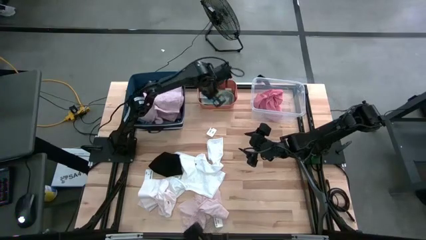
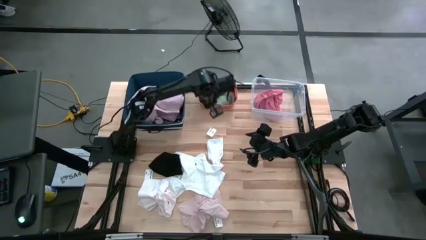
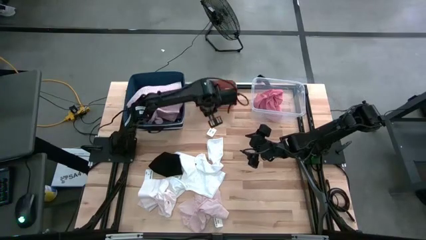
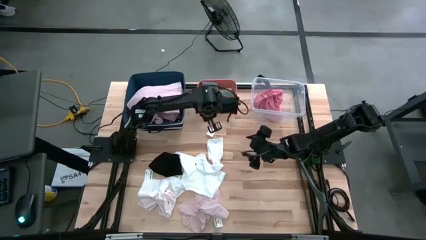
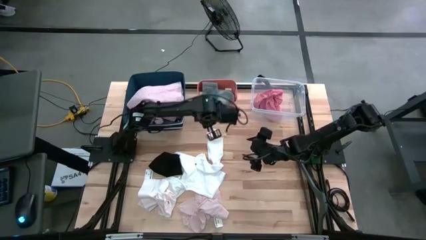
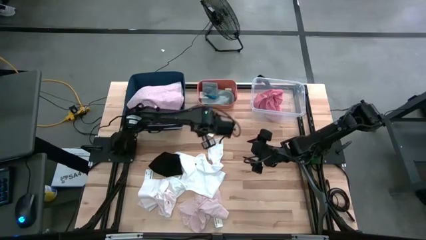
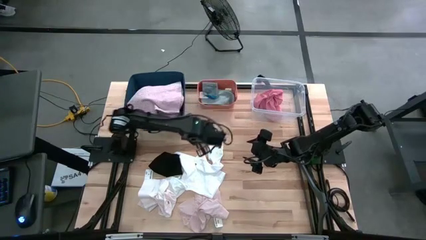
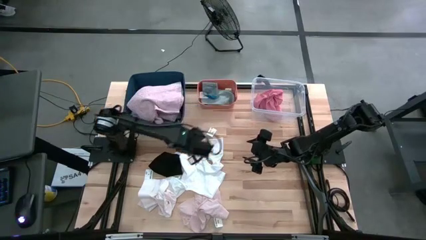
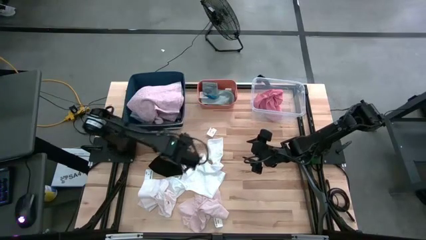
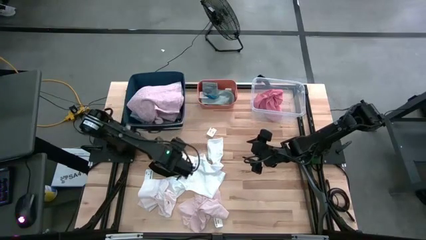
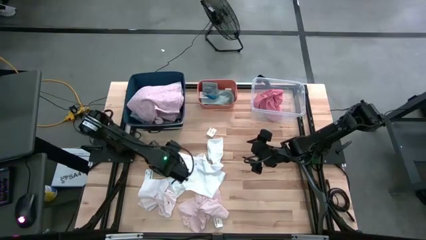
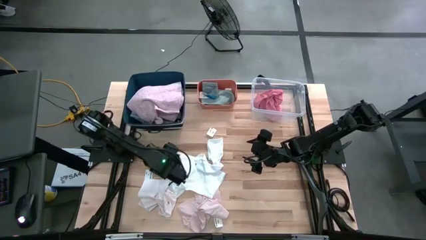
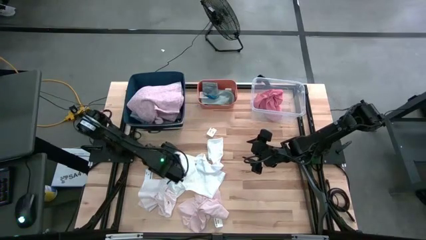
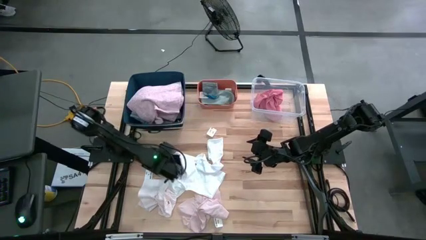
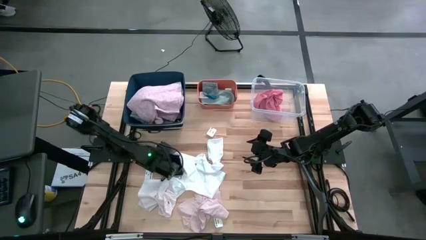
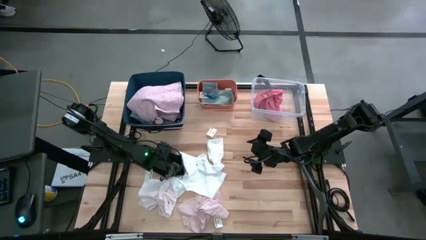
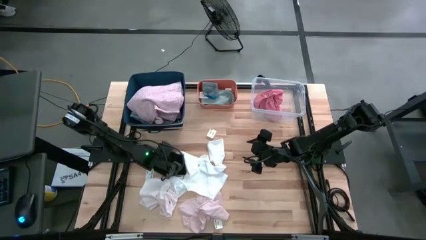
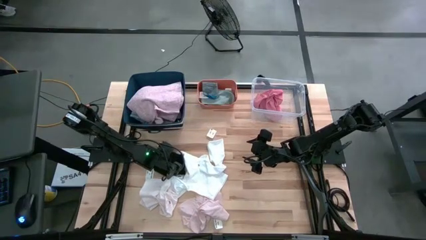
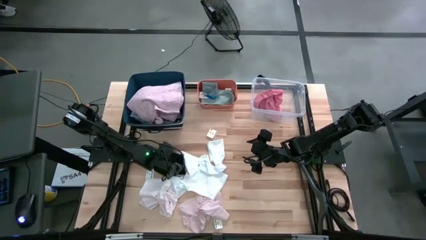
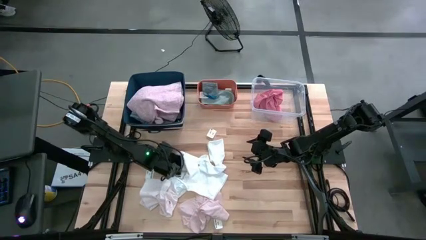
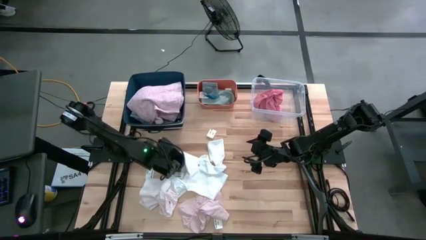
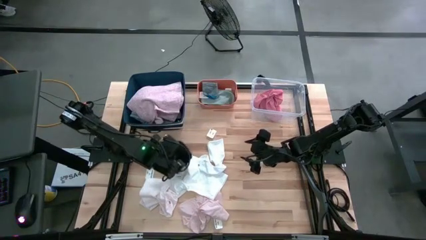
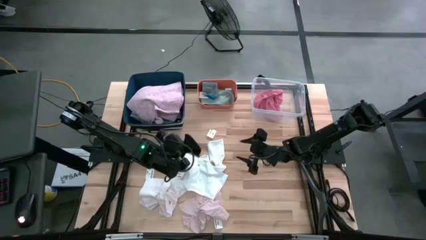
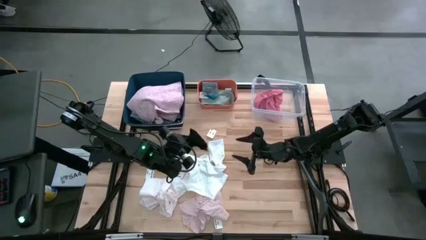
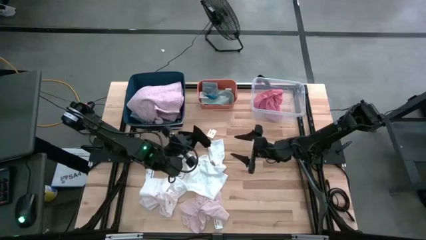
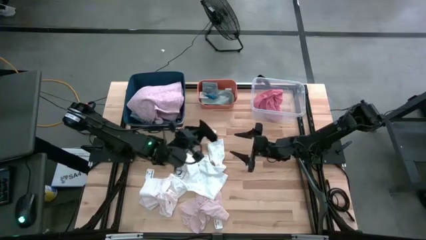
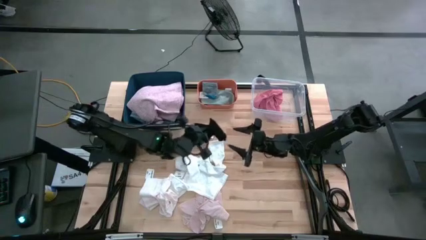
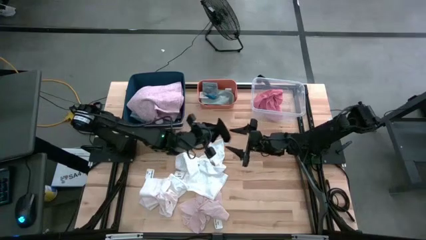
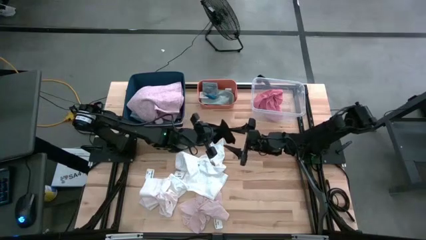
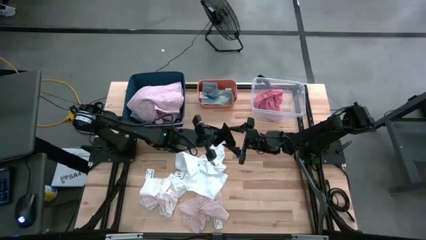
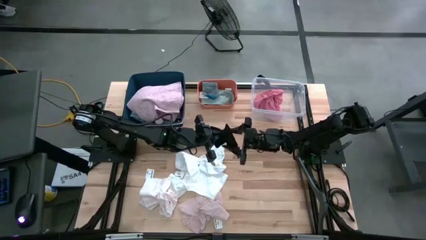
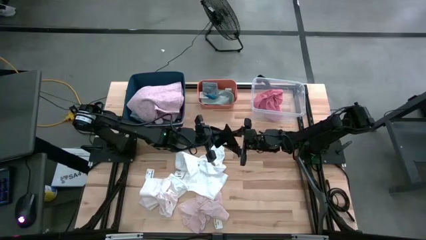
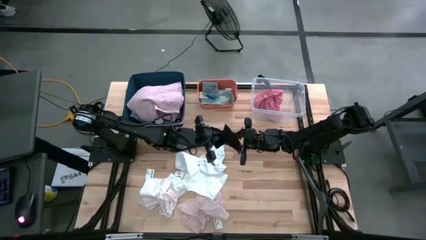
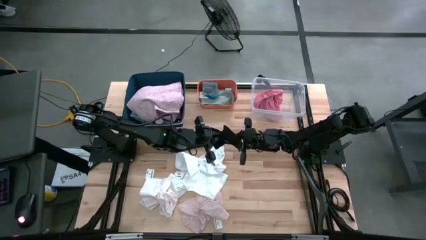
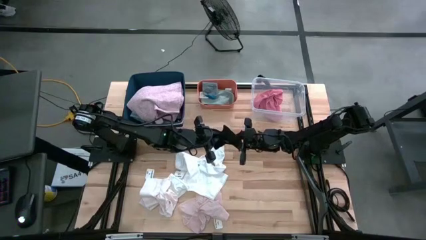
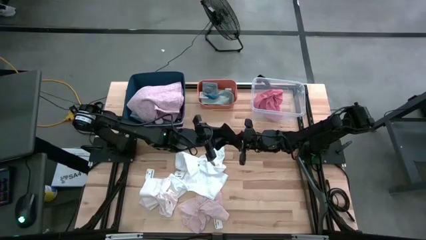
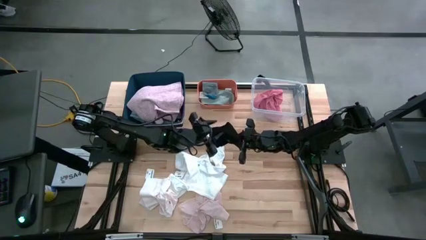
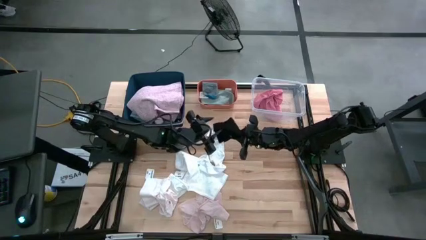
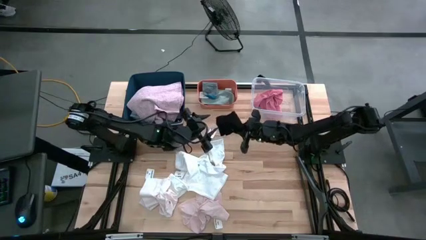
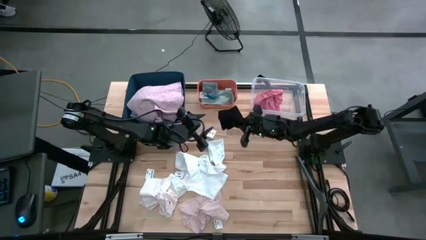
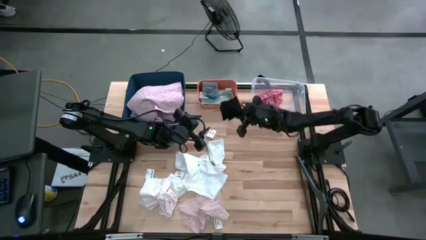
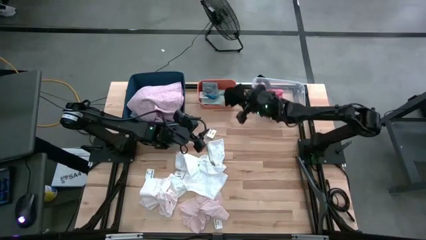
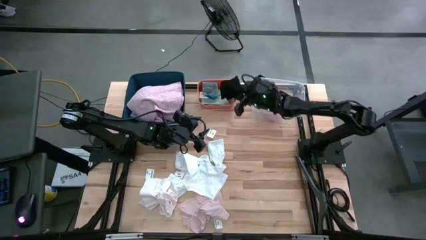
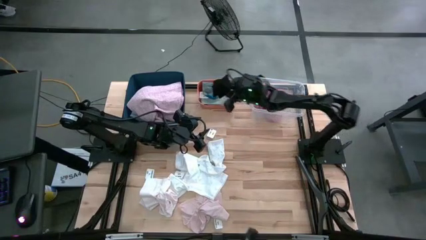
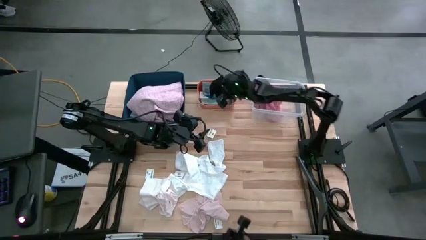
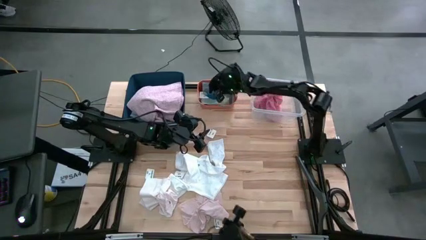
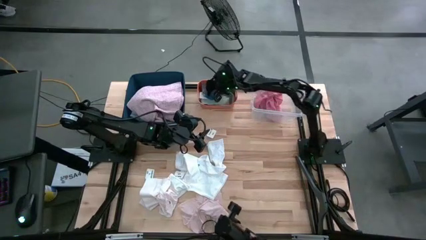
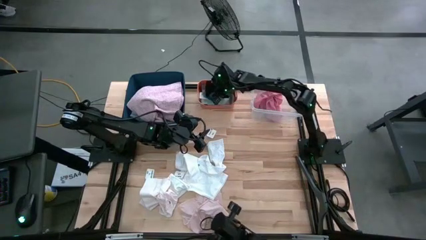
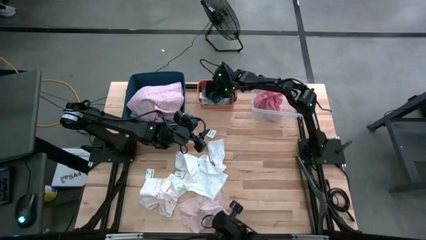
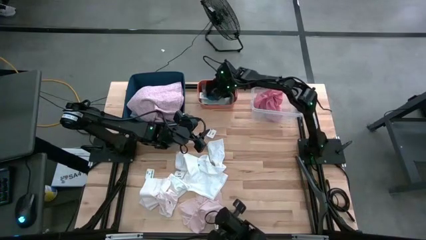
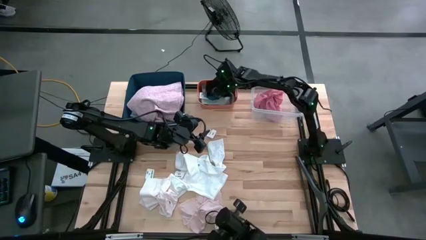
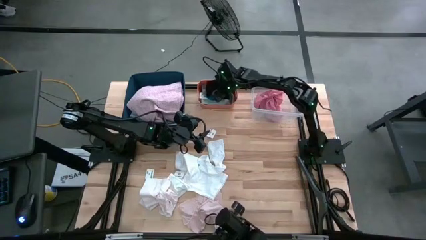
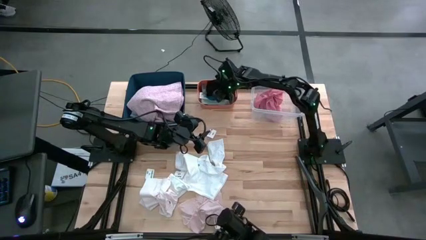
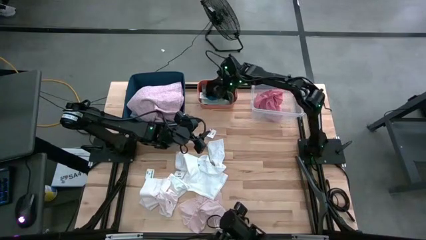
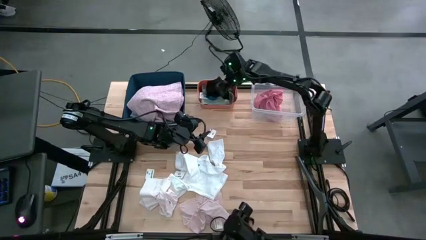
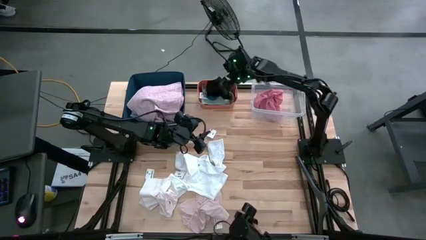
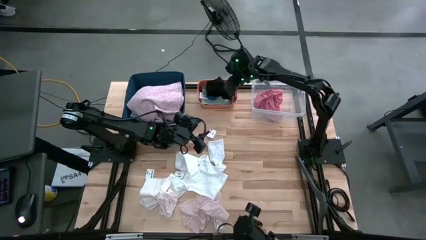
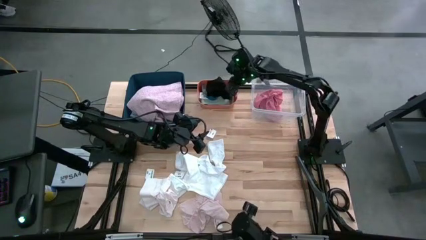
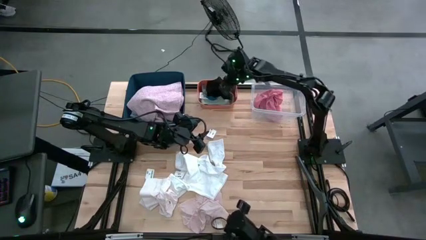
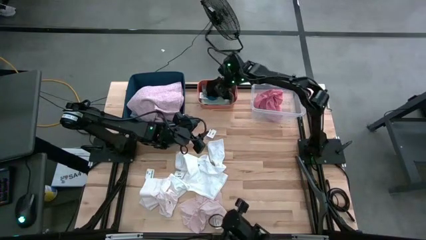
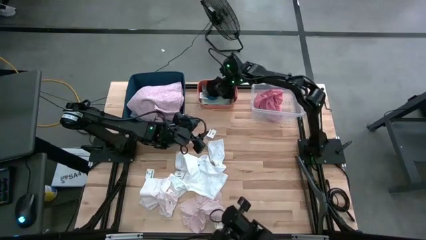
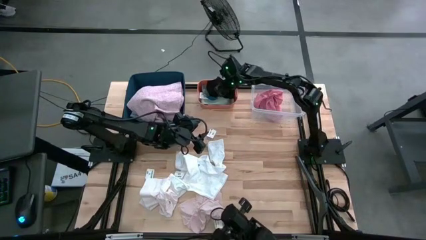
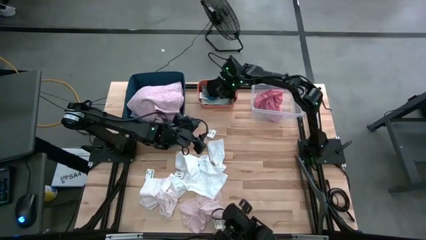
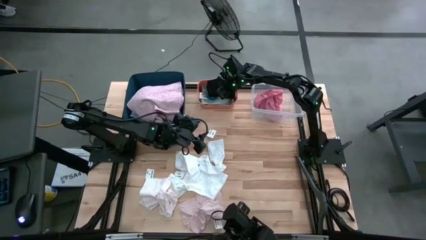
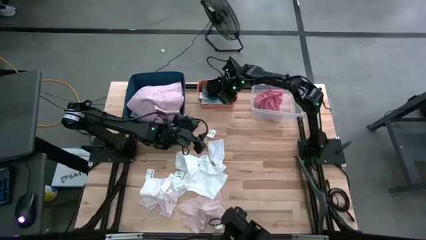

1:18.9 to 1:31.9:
Task: Pick & Place Cloths
Put the black sock into the orange bin
